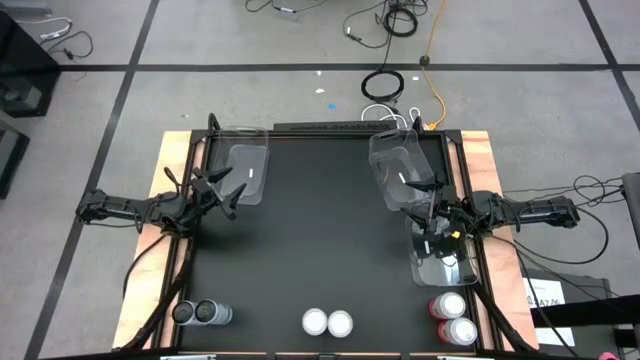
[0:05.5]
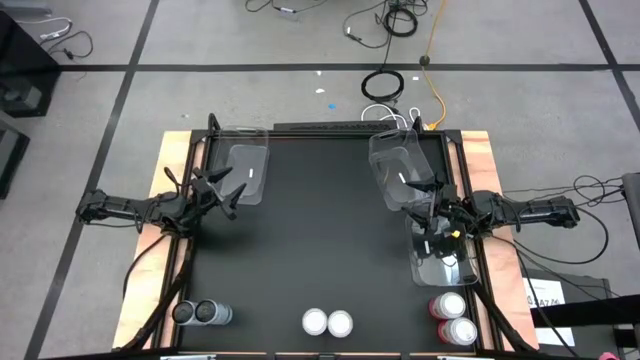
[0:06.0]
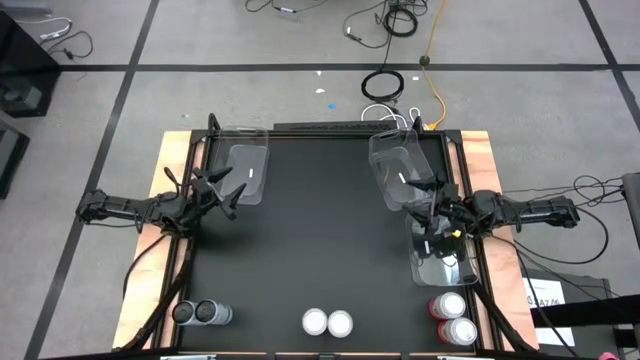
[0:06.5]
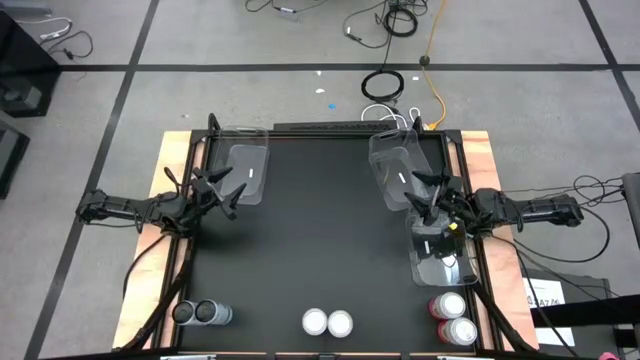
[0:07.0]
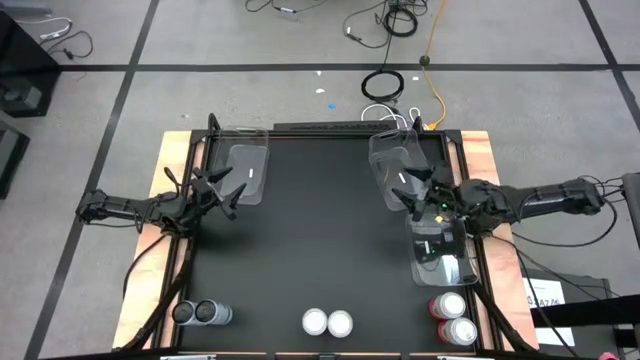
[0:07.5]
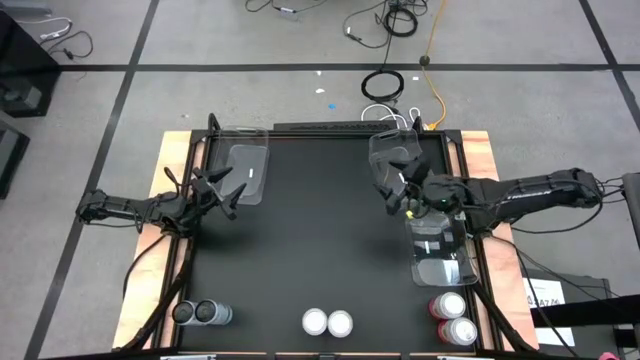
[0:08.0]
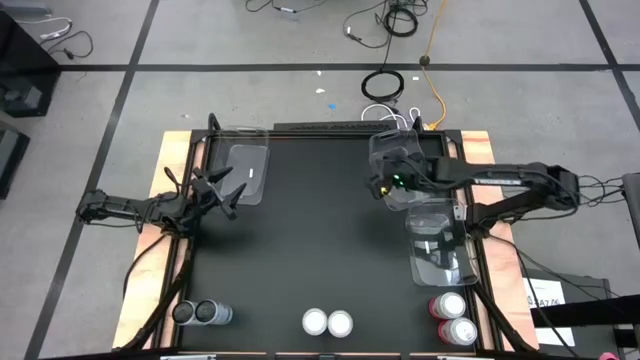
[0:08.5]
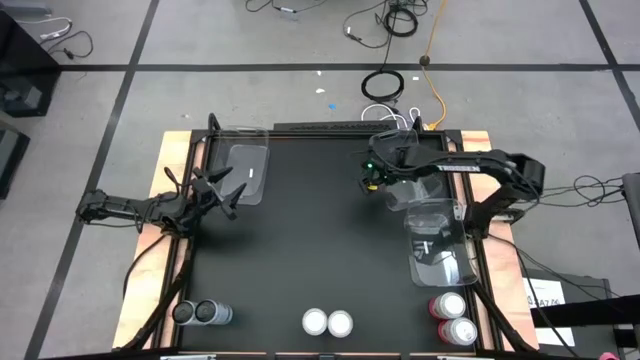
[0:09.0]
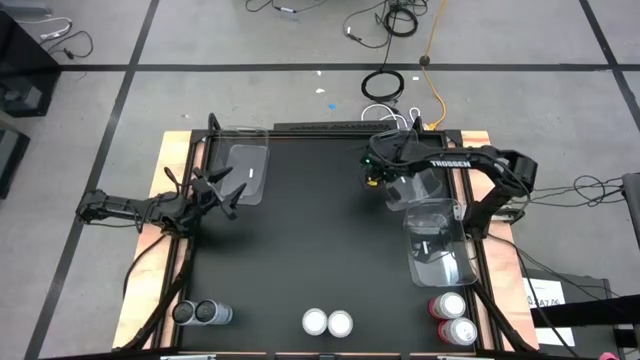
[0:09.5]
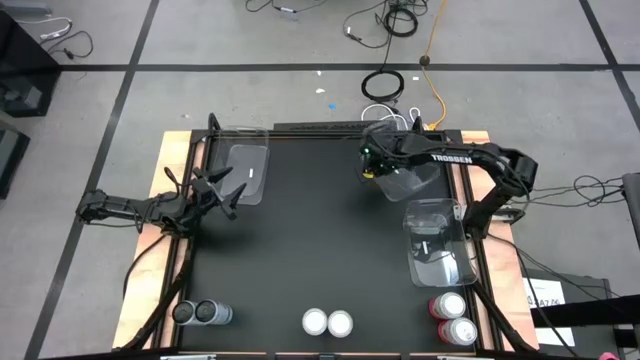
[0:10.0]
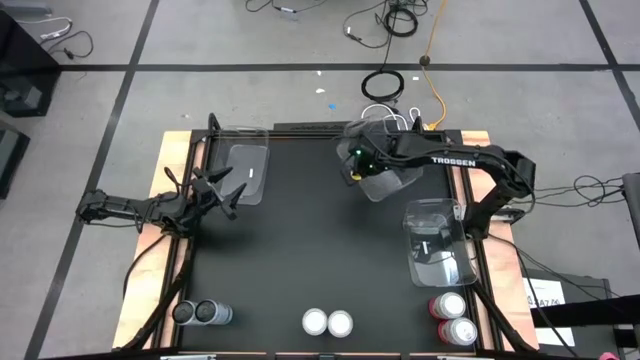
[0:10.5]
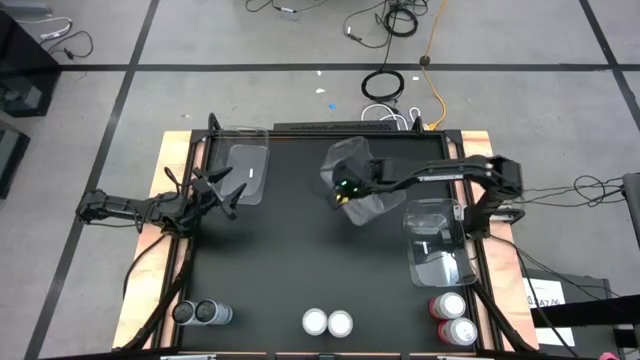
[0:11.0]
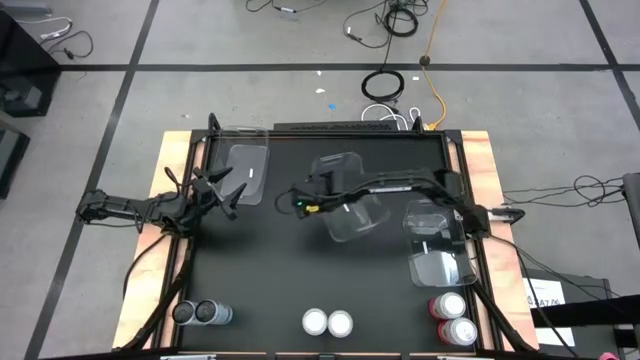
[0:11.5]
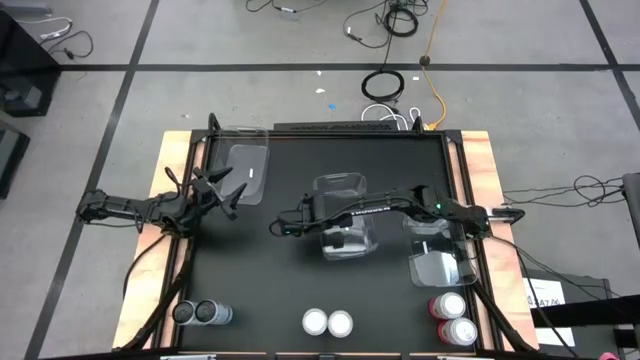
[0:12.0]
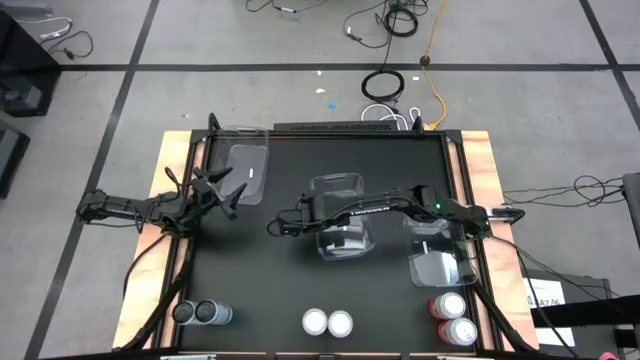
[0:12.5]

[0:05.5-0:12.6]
Task: Sort soda cans
Move the top right transparent bin to the center

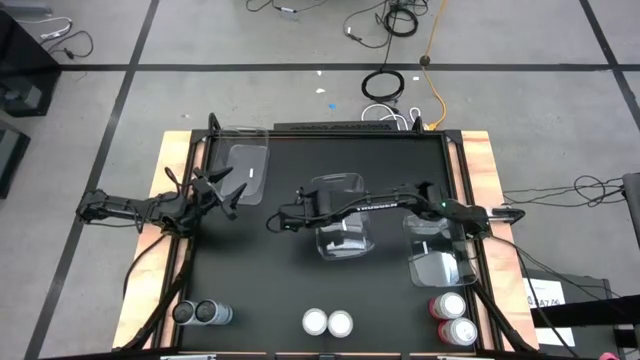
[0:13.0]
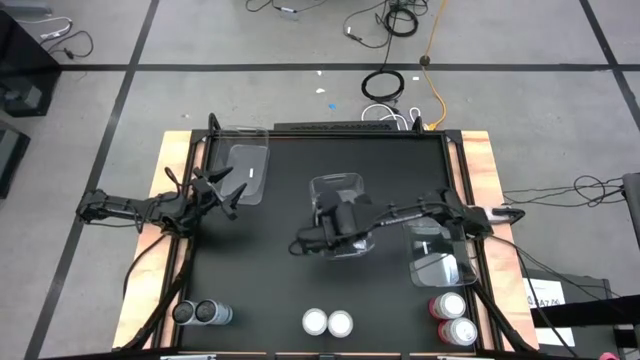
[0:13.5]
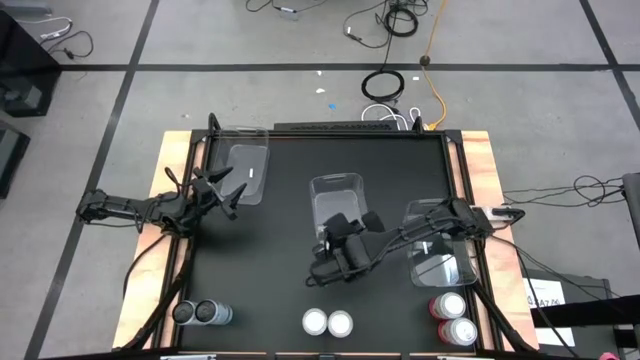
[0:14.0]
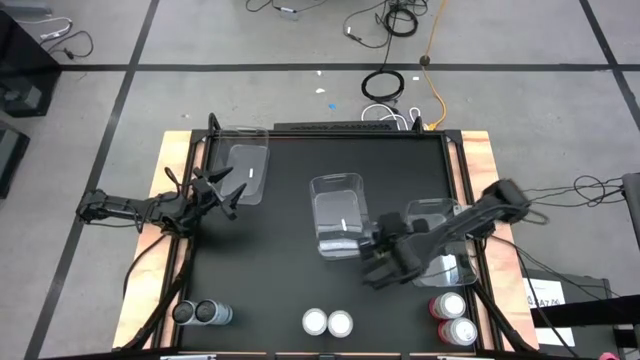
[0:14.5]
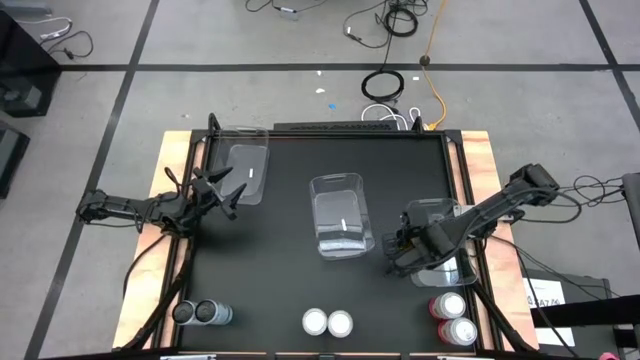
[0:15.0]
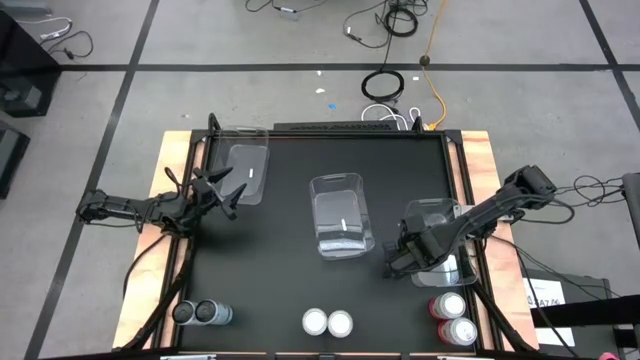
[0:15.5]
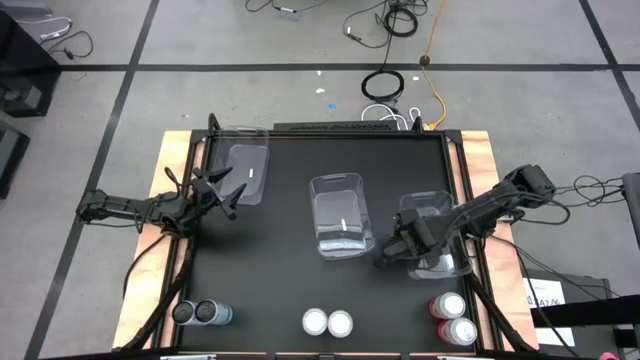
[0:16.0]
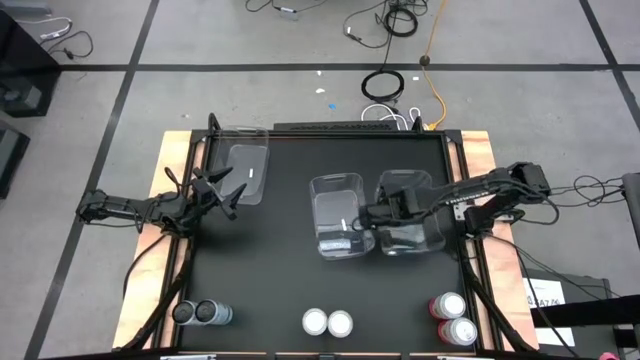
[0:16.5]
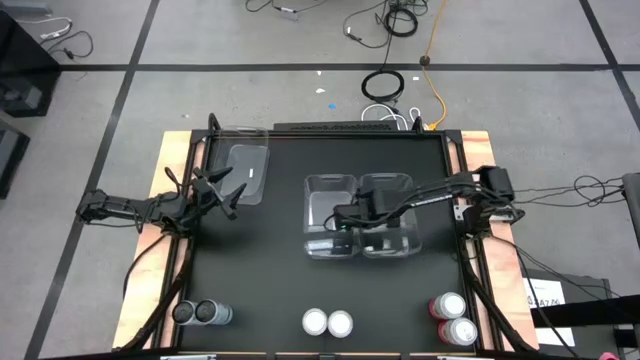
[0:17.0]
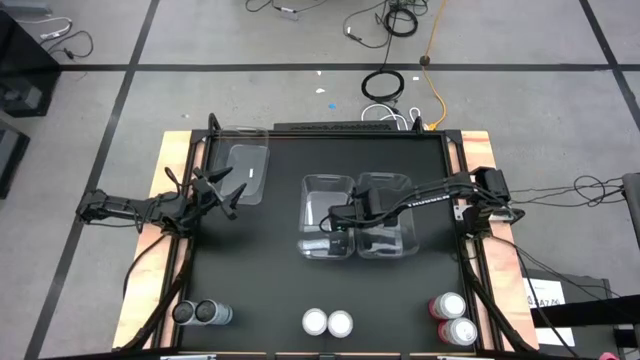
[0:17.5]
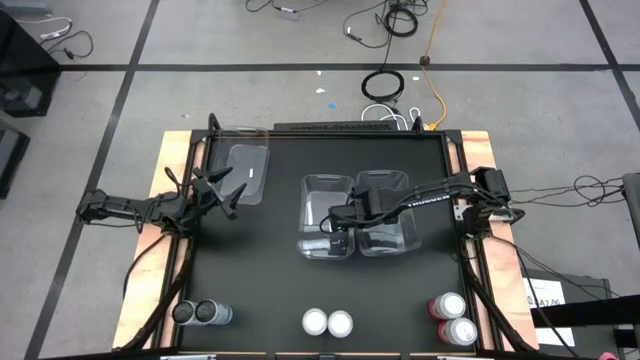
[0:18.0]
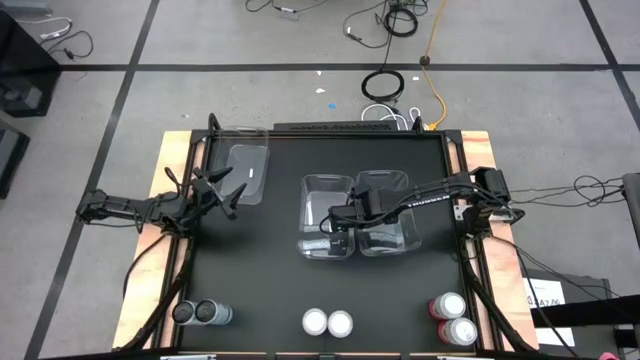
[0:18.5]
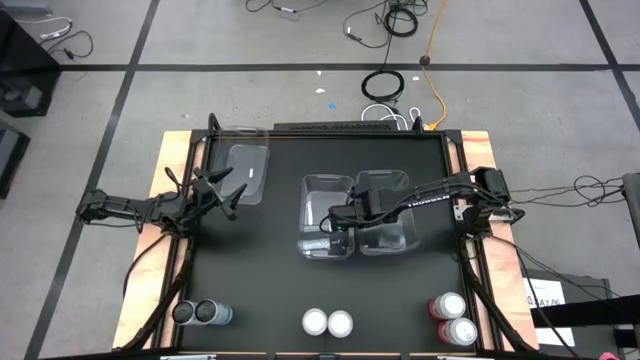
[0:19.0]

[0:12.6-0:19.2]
Move the right transparent bin to the center

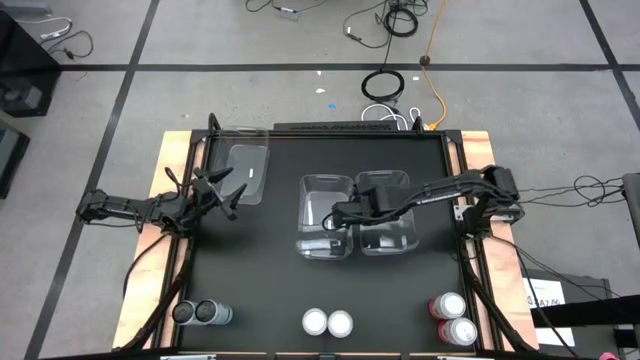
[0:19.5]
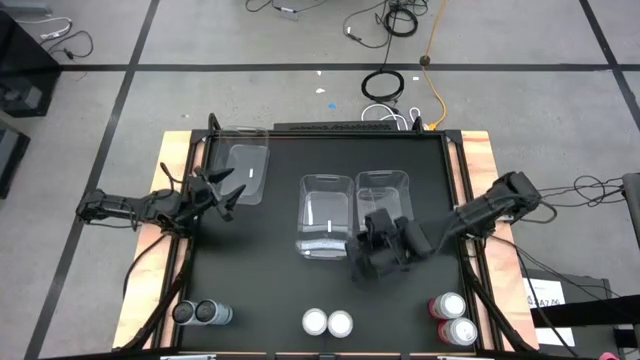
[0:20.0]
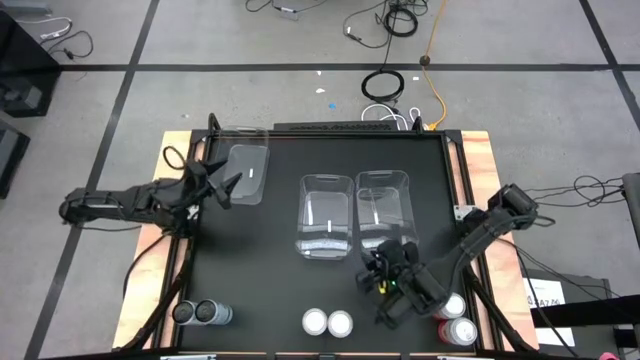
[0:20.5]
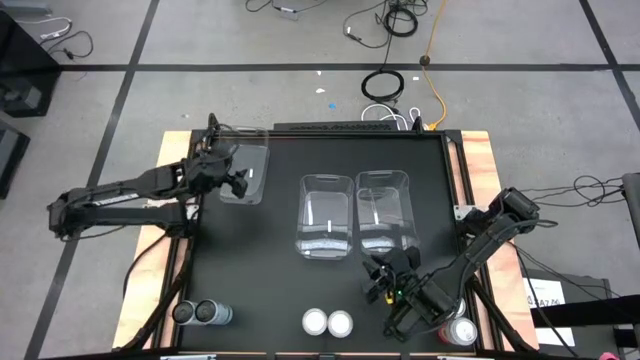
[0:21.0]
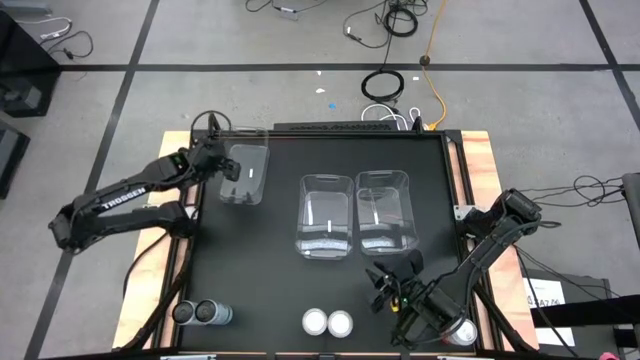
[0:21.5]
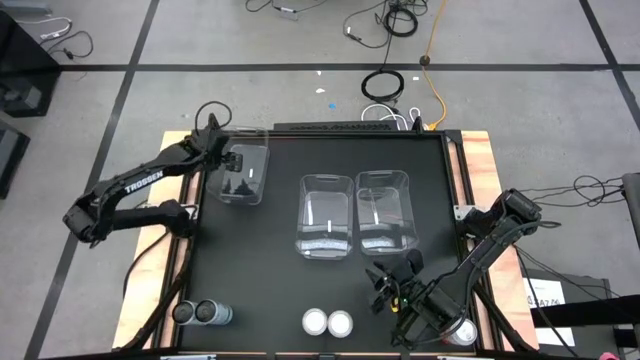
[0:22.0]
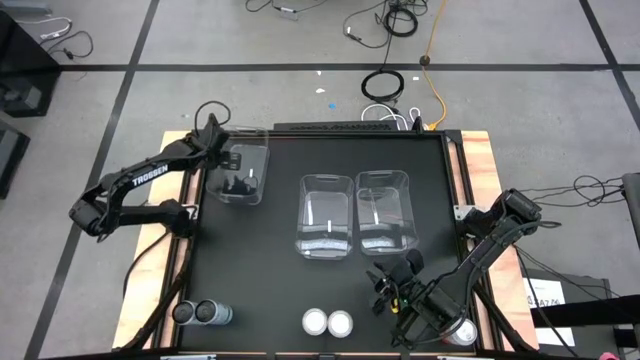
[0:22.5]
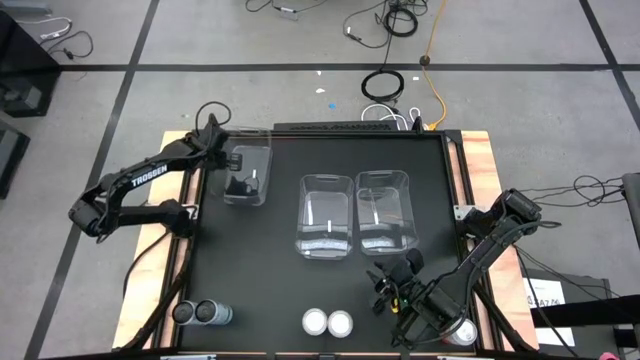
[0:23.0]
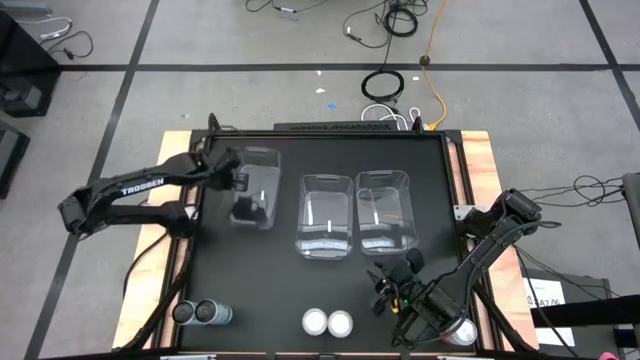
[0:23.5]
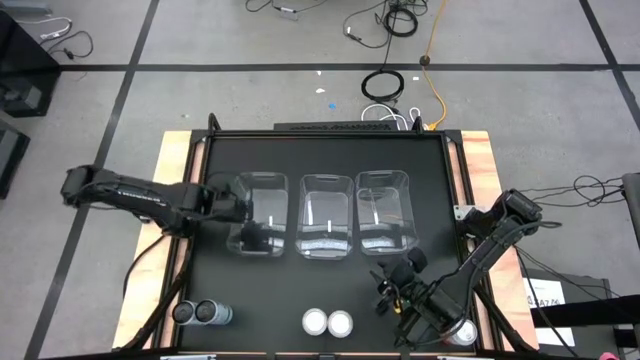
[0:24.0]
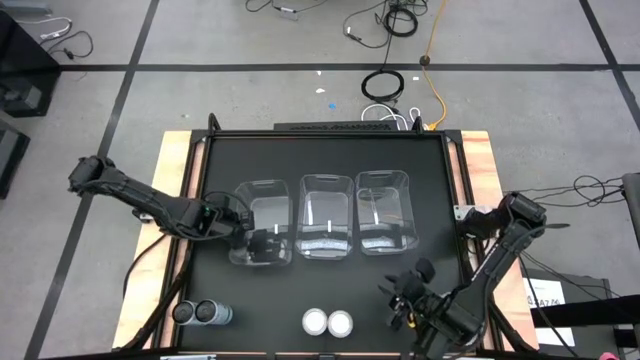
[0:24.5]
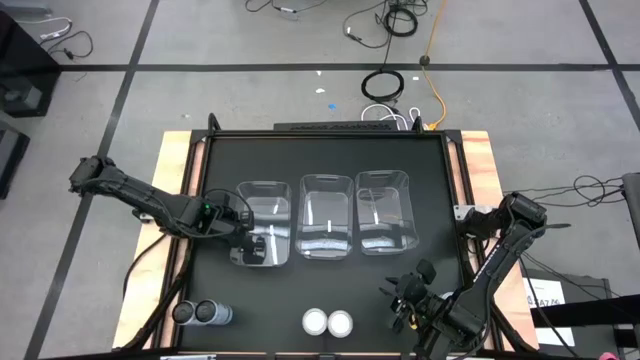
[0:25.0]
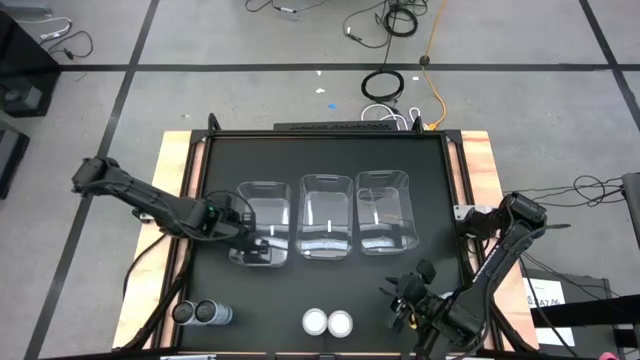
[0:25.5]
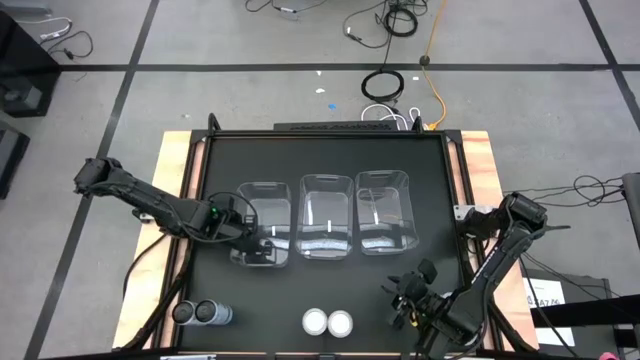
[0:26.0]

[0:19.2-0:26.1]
Move the left transparent bin to the center
